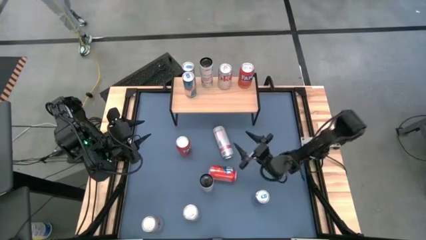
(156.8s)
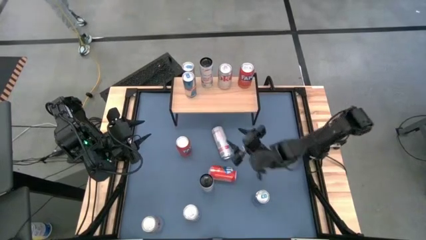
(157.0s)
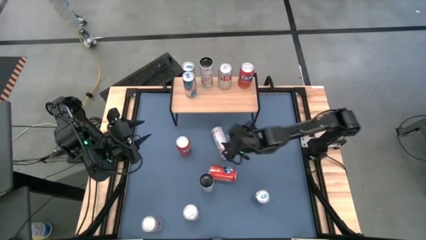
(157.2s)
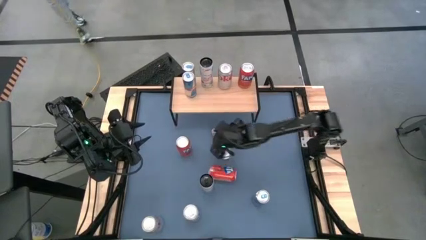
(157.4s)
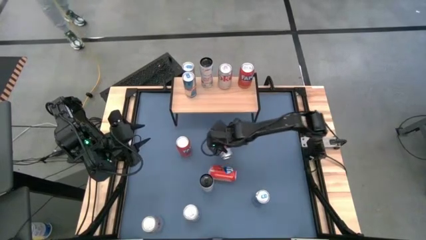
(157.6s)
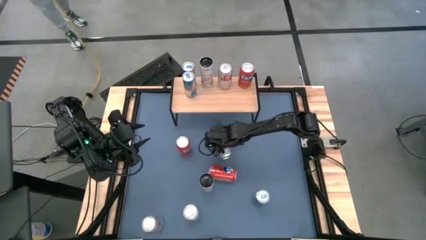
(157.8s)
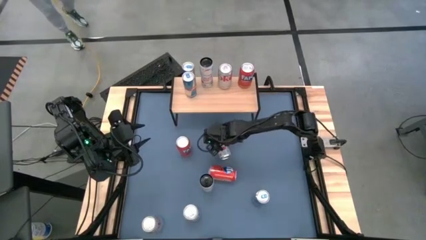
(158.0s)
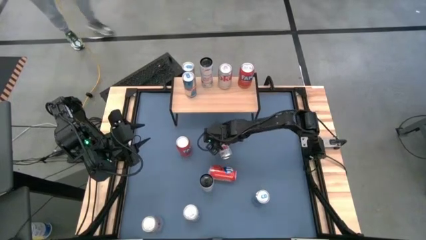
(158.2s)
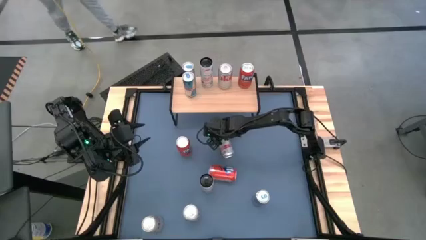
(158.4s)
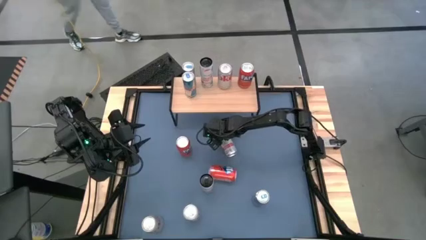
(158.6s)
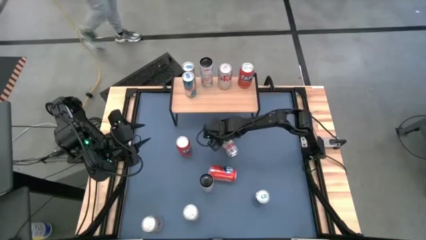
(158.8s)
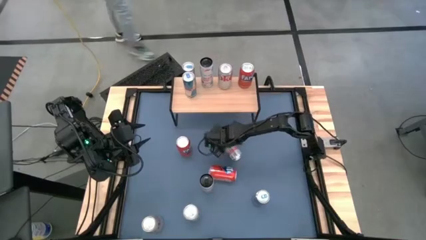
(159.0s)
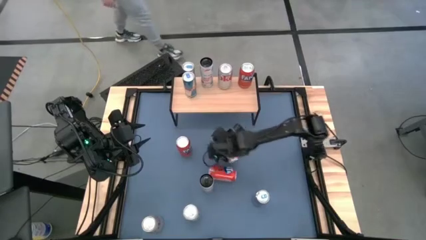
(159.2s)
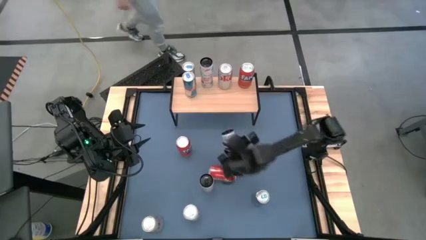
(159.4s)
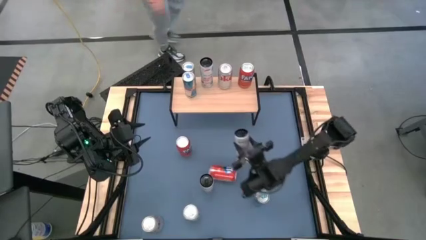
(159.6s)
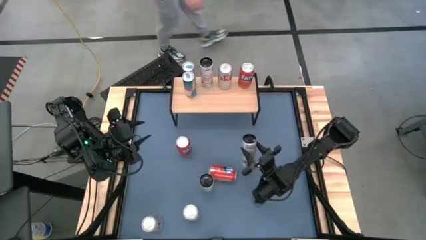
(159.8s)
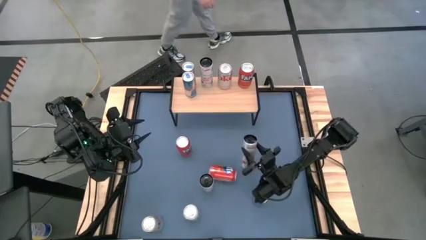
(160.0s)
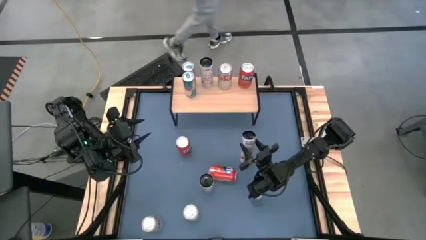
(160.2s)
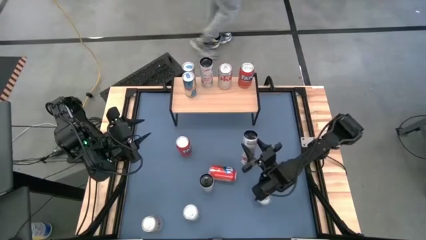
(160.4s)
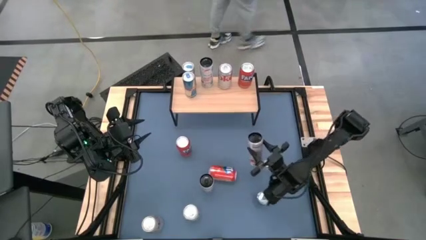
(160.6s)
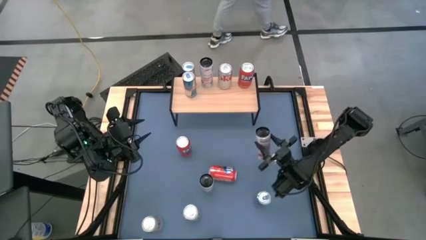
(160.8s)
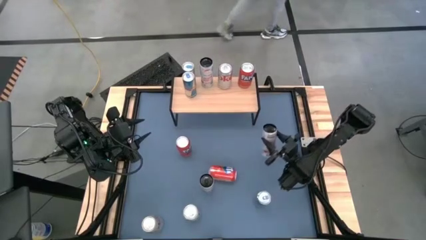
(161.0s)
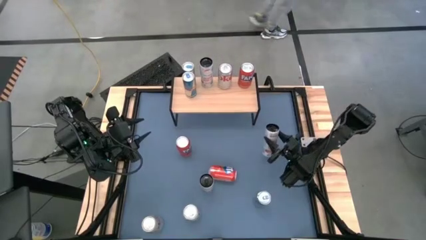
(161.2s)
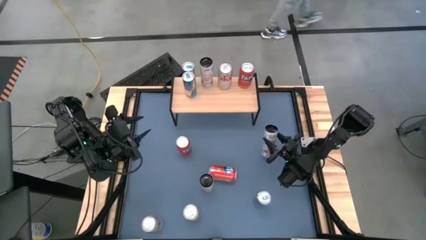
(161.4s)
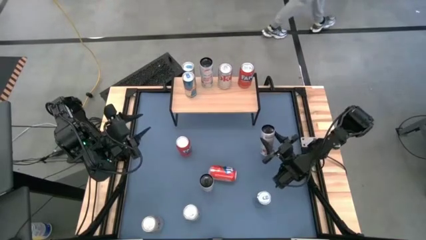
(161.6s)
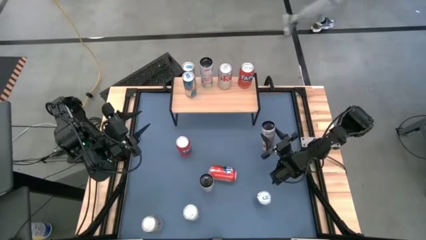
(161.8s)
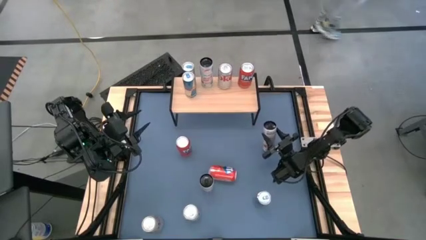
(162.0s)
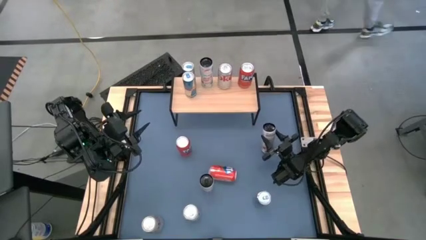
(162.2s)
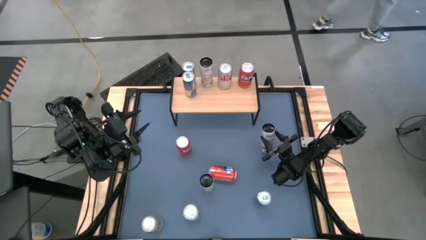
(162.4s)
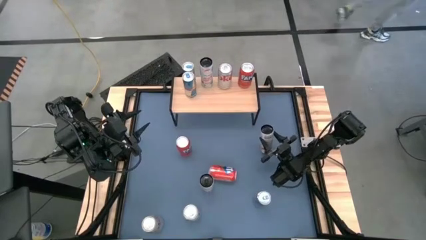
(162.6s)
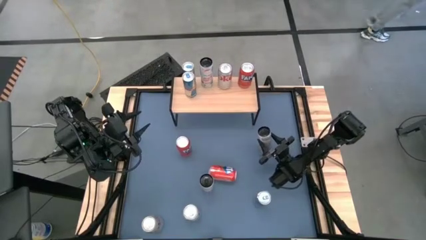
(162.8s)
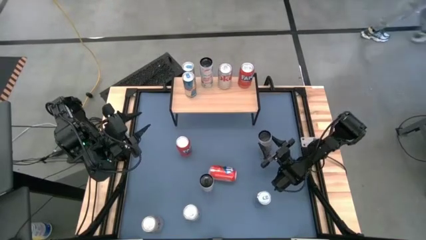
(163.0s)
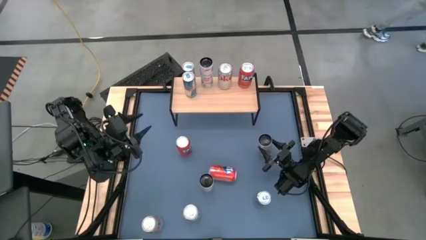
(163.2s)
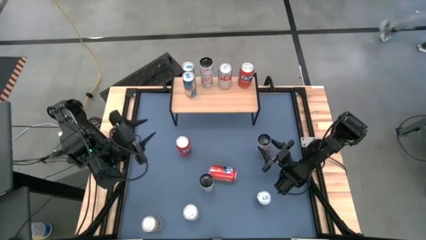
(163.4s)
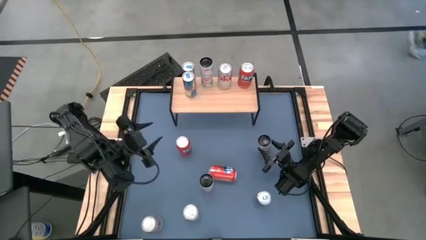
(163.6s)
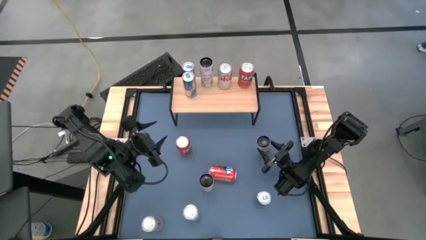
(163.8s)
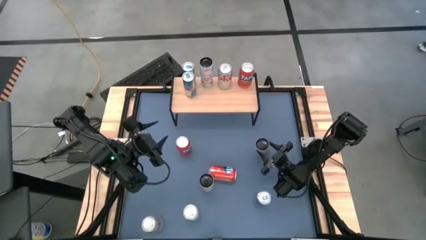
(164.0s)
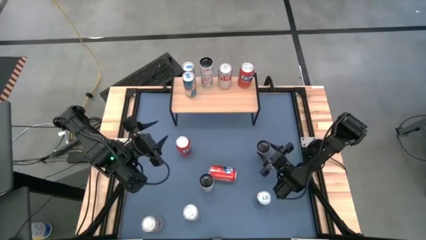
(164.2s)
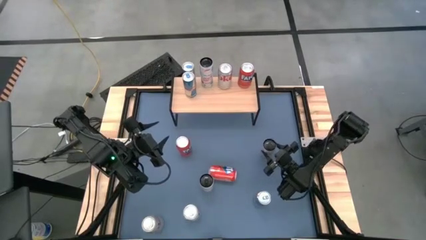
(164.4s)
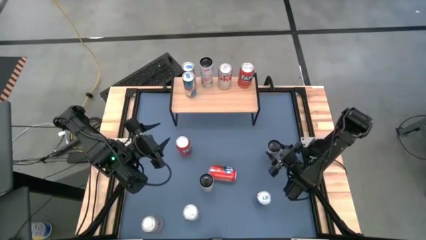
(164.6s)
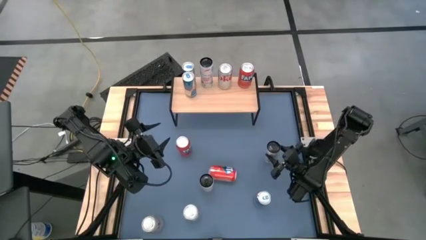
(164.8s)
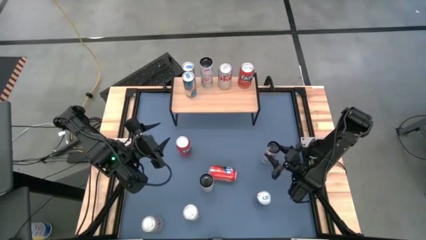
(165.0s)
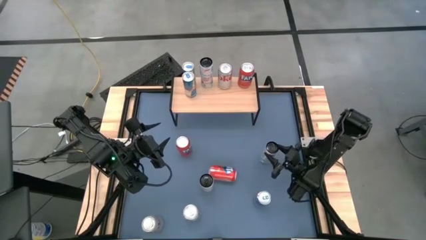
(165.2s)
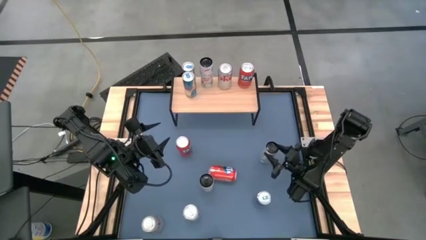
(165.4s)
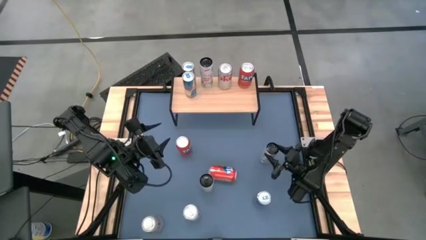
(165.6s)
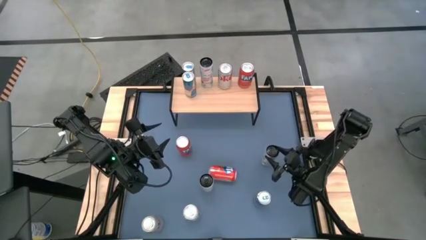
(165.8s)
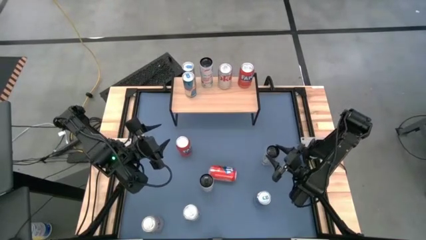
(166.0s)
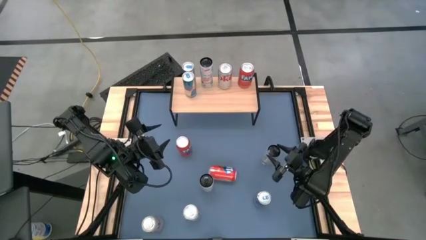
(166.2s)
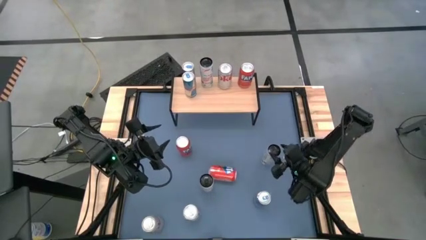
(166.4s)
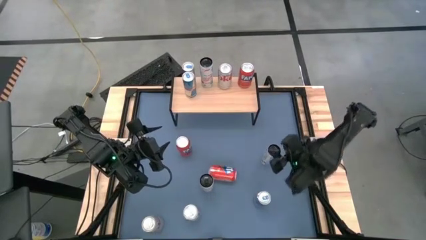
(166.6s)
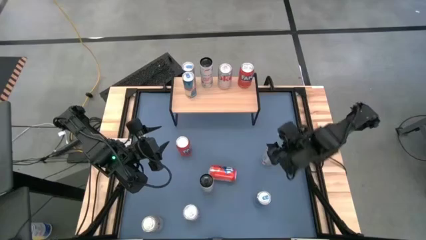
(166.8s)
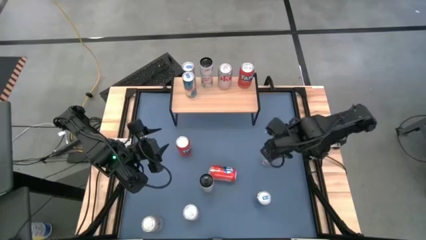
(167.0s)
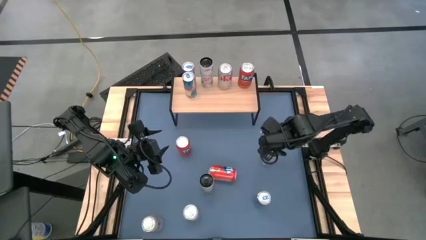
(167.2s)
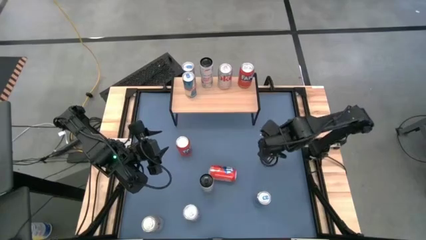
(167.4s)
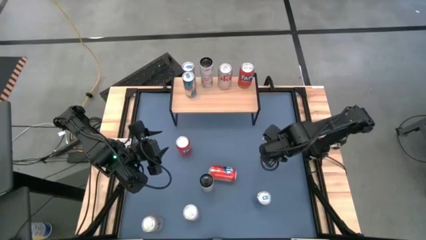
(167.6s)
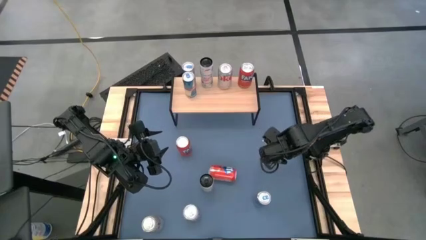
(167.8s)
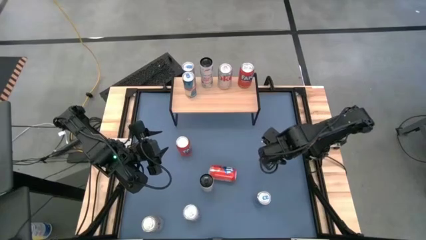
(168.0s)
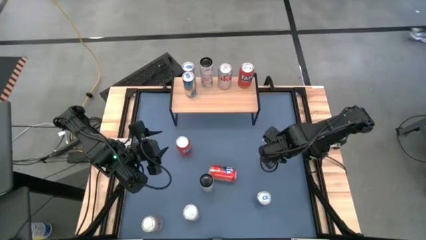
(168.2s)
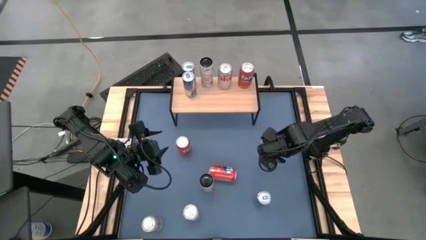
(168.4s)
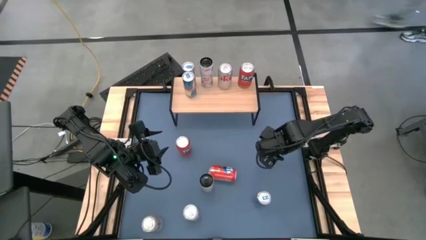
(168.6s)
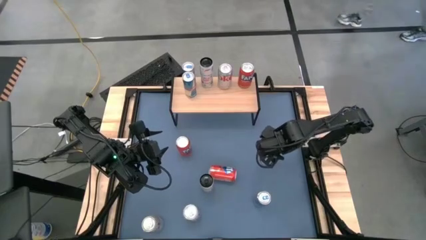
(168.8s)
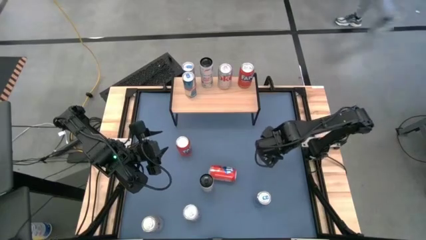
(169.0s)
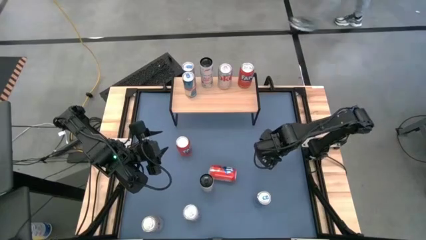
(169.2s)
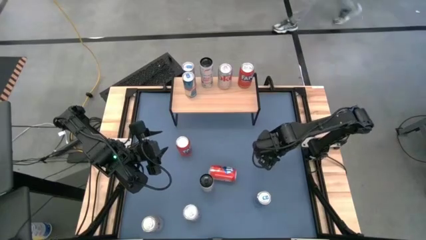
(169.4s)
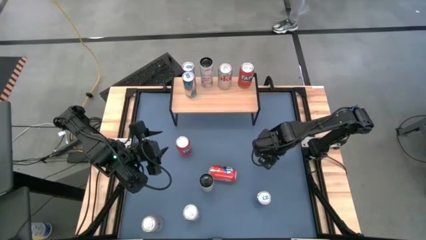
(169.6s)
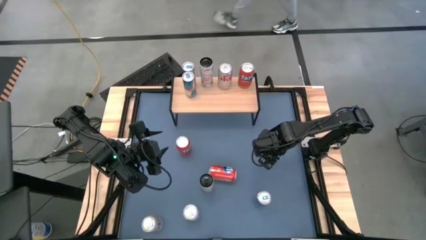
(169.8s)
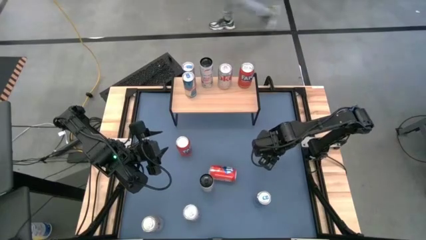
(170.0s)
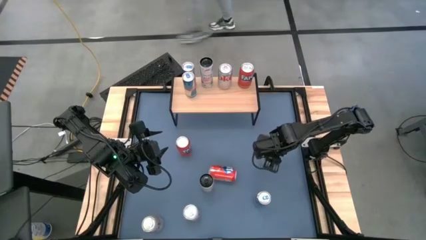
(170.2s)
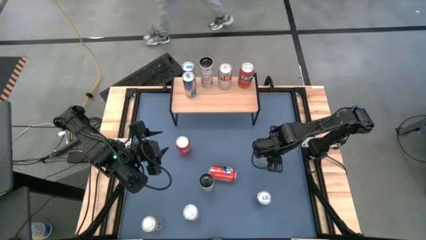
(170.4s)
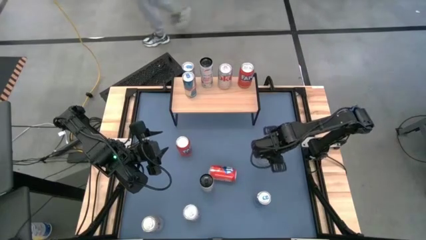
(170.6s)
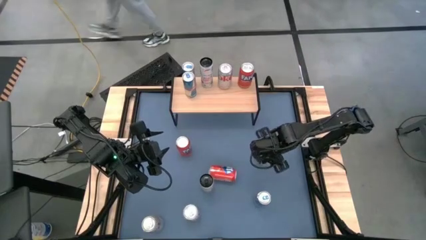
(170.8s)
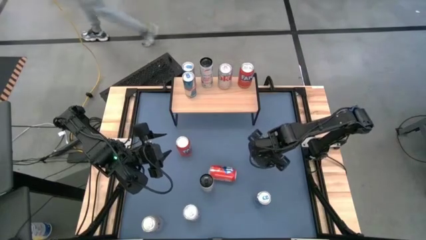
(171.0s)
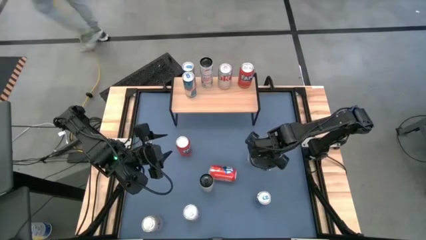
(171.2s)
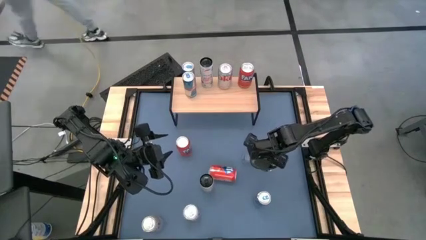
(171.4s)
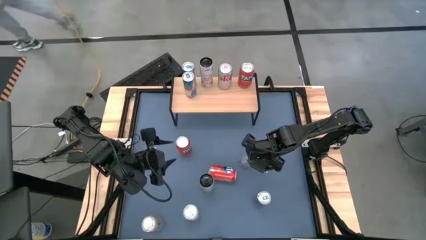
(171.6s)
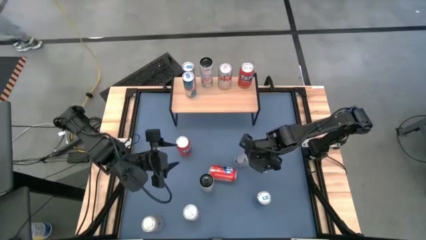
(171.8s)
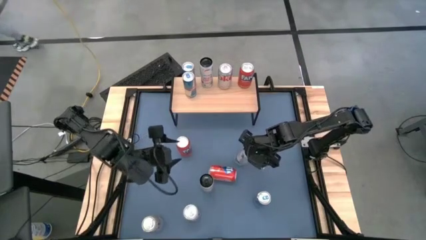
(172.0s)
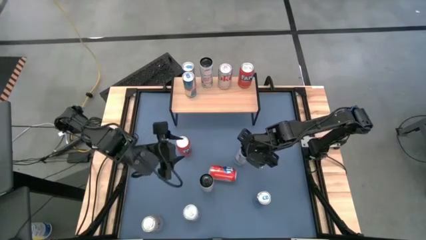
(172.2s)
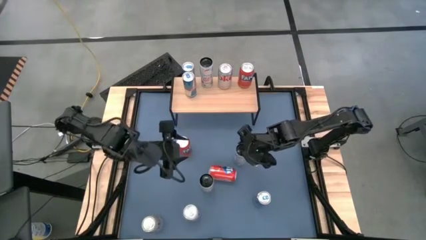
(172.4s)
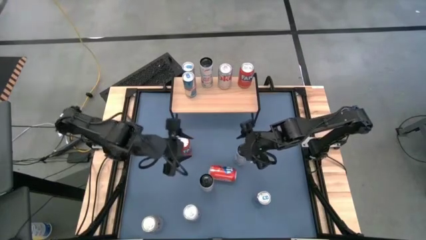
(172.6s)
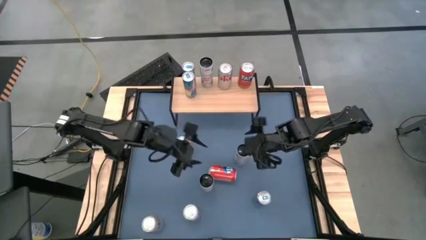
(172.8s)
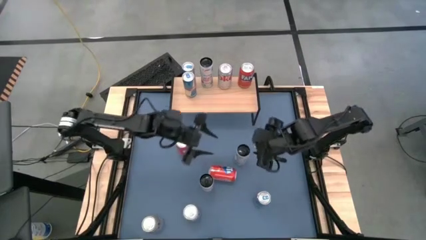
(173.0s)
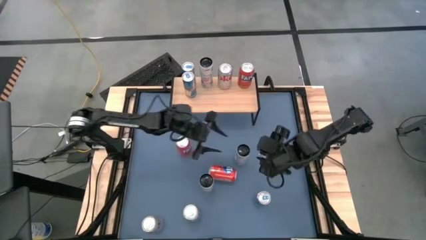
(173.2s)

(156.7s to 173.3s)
Task: Place canned beverage on shelf
Move the right pink soda can to the center of the table
